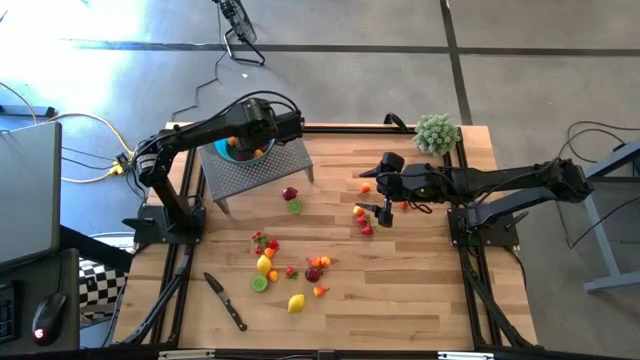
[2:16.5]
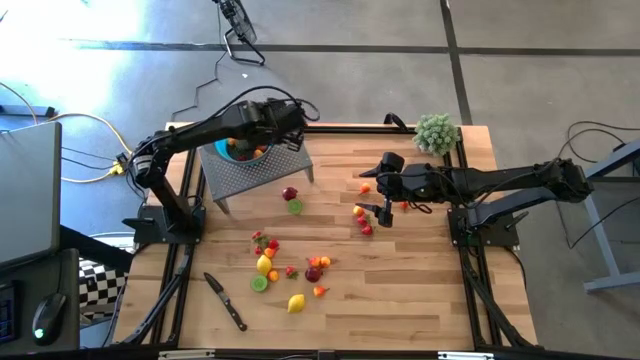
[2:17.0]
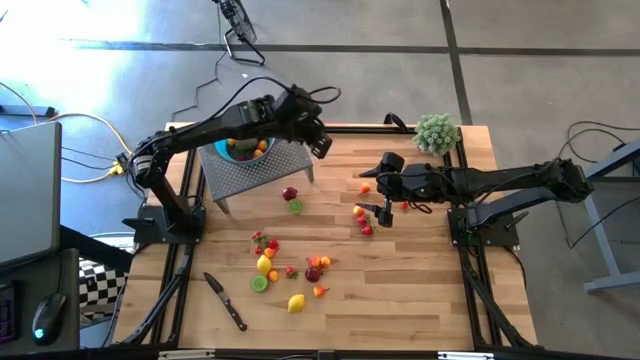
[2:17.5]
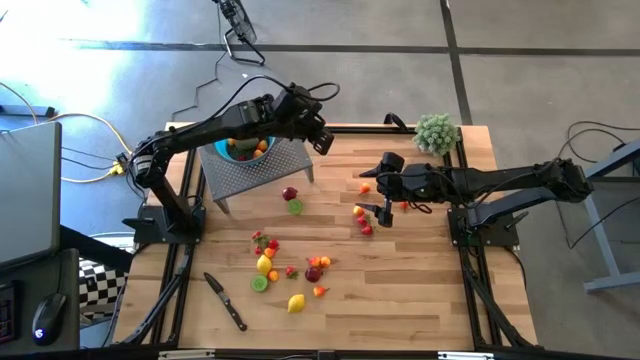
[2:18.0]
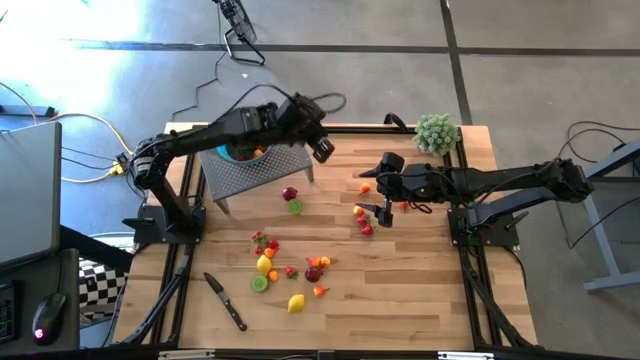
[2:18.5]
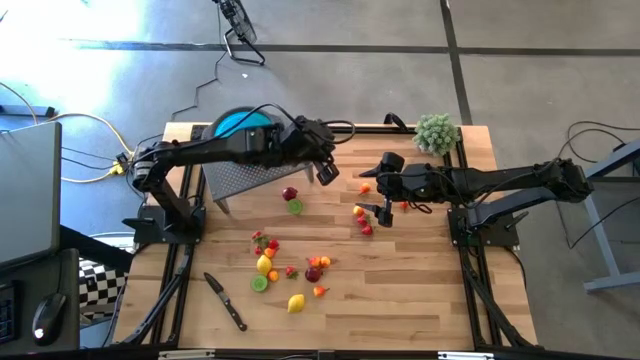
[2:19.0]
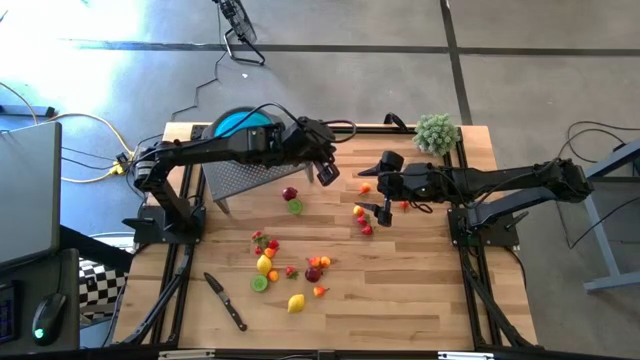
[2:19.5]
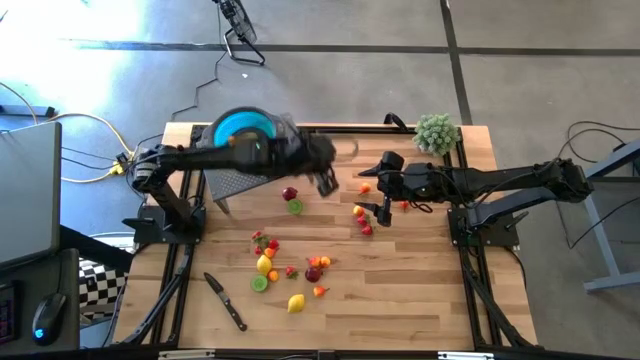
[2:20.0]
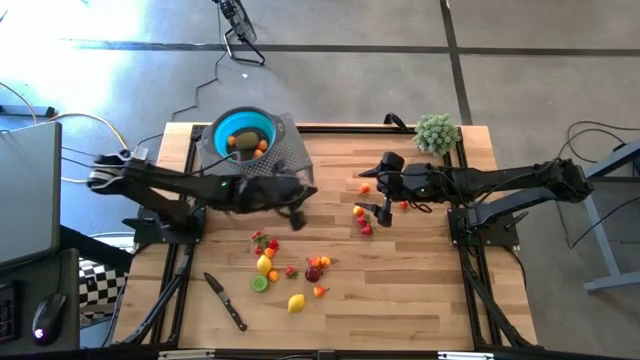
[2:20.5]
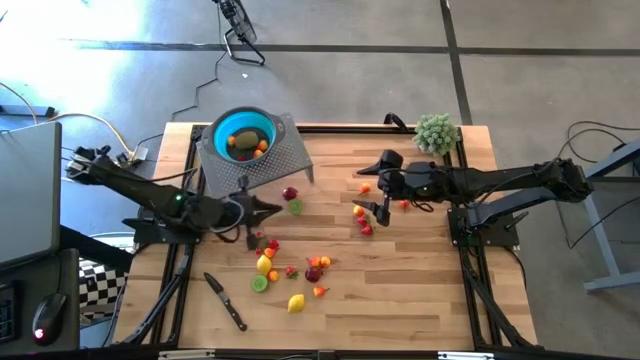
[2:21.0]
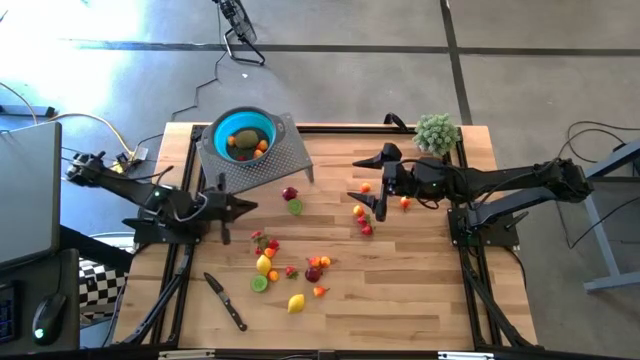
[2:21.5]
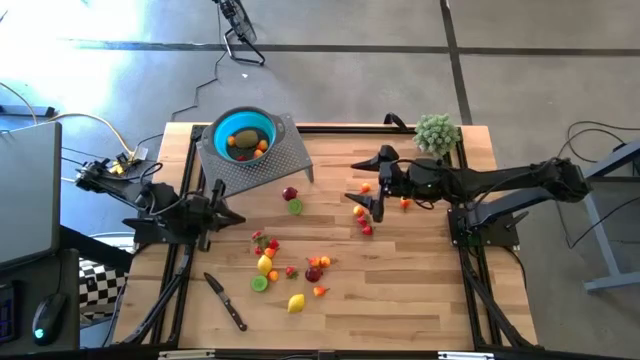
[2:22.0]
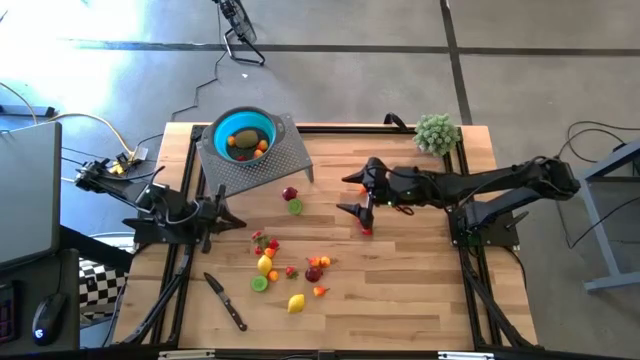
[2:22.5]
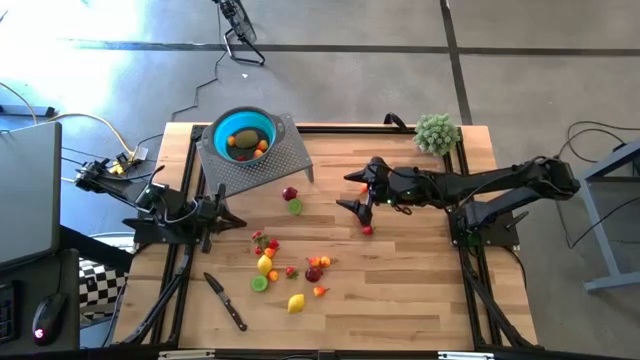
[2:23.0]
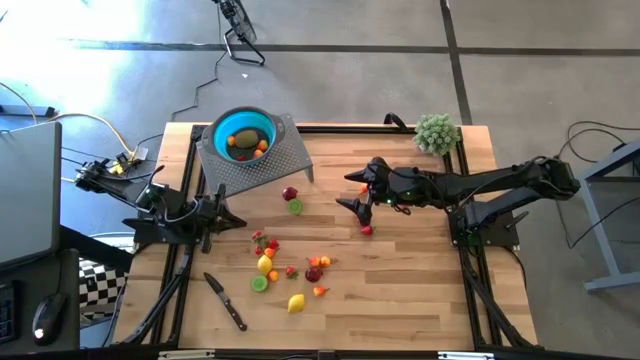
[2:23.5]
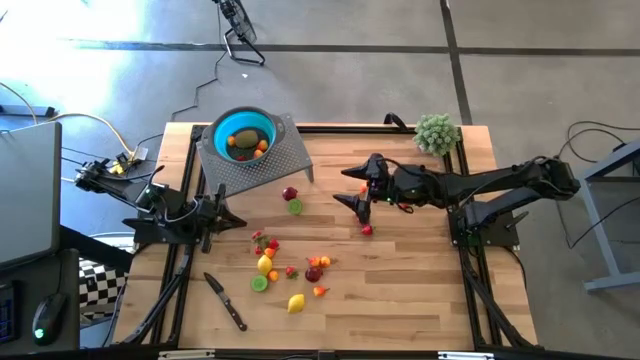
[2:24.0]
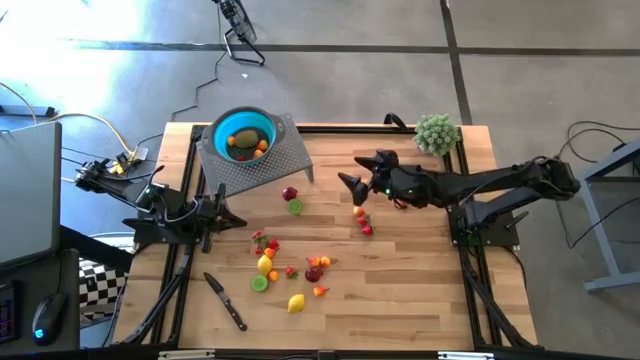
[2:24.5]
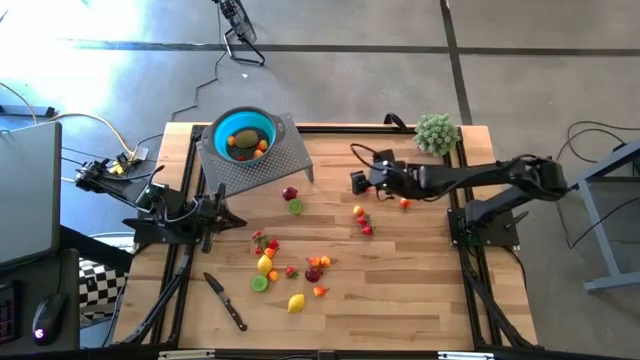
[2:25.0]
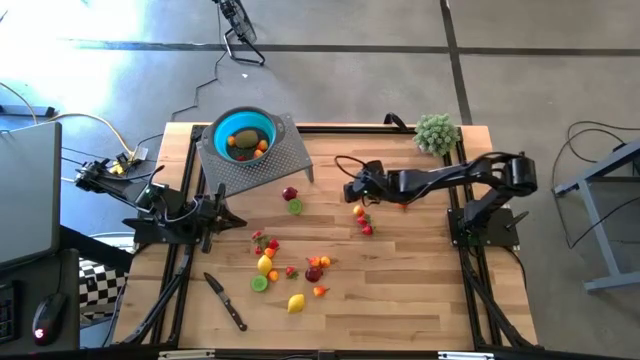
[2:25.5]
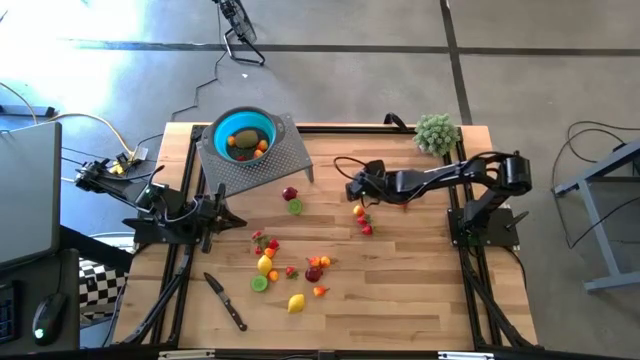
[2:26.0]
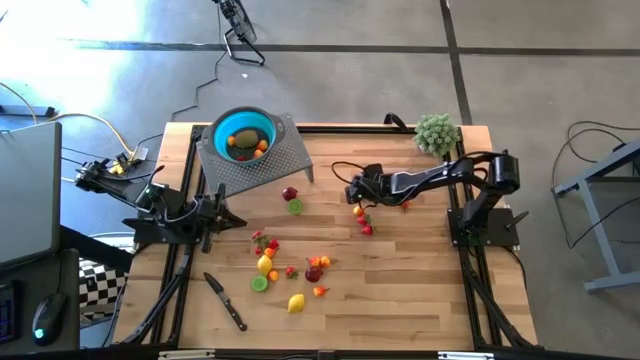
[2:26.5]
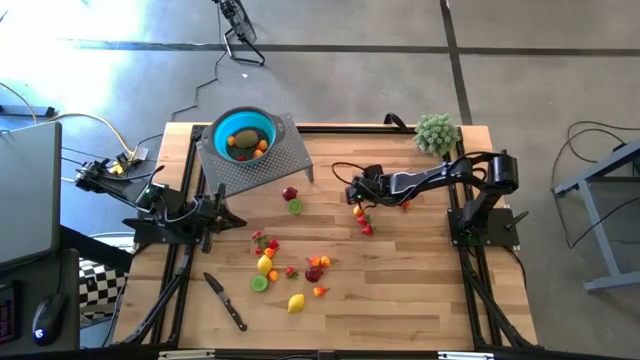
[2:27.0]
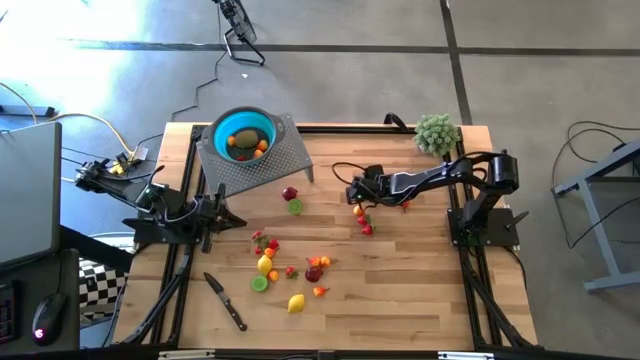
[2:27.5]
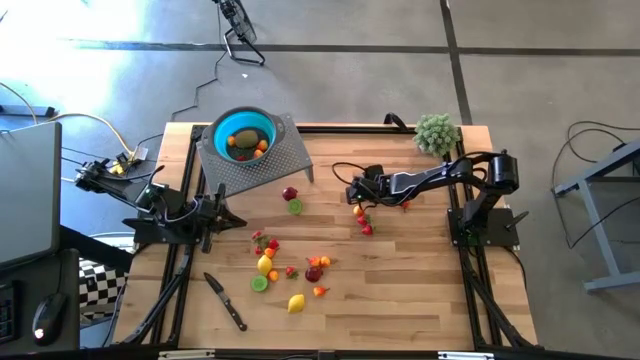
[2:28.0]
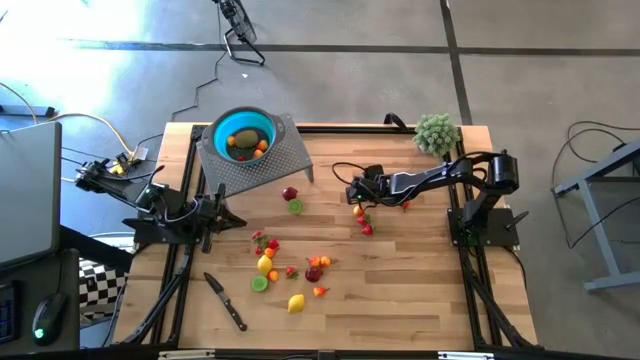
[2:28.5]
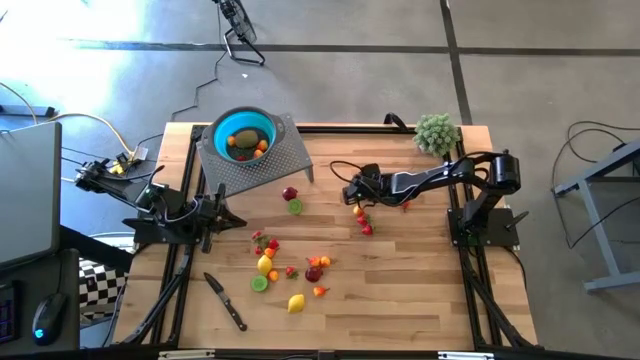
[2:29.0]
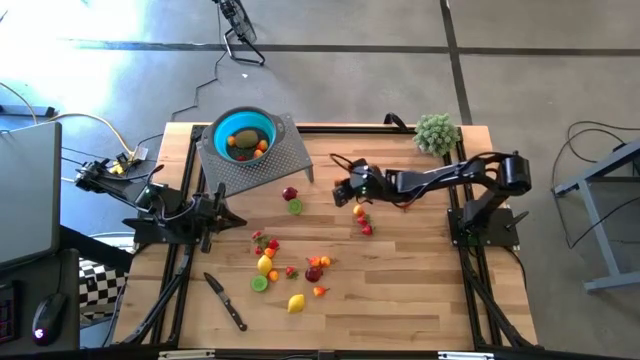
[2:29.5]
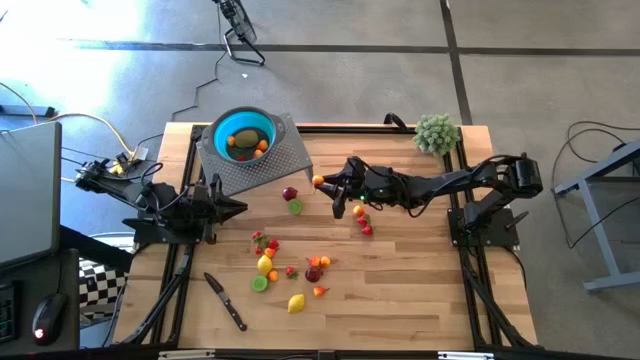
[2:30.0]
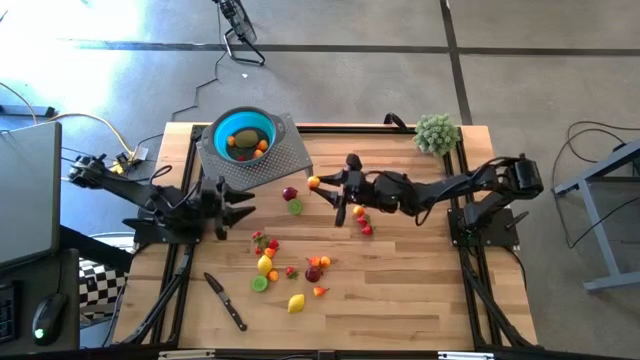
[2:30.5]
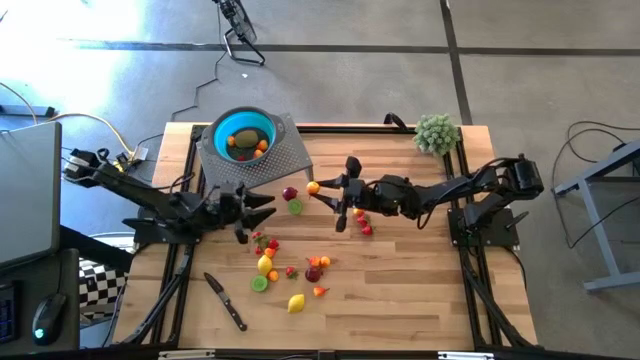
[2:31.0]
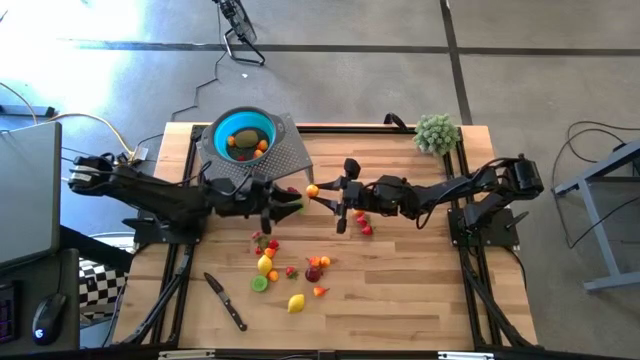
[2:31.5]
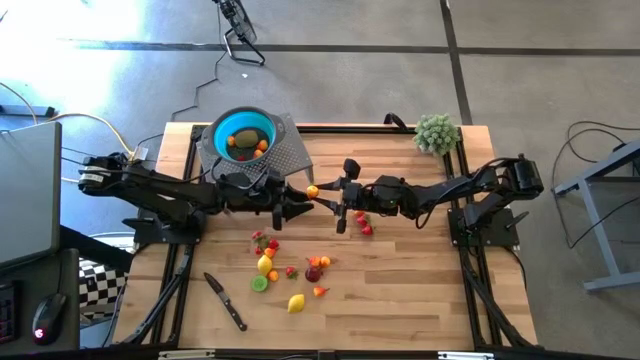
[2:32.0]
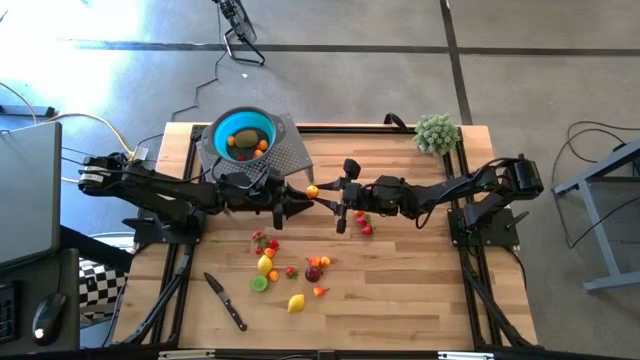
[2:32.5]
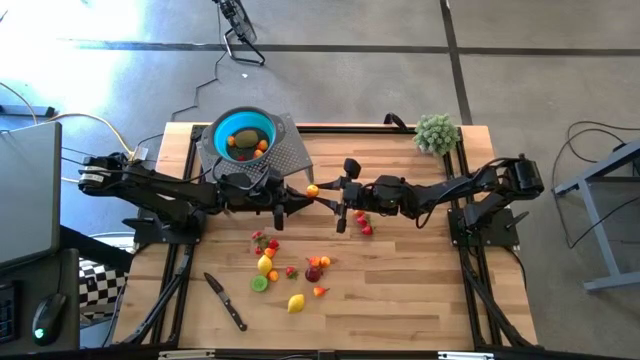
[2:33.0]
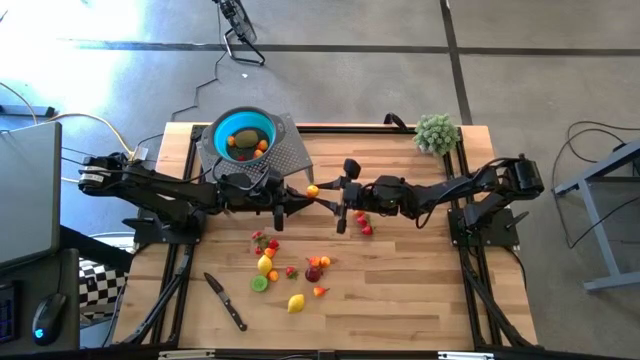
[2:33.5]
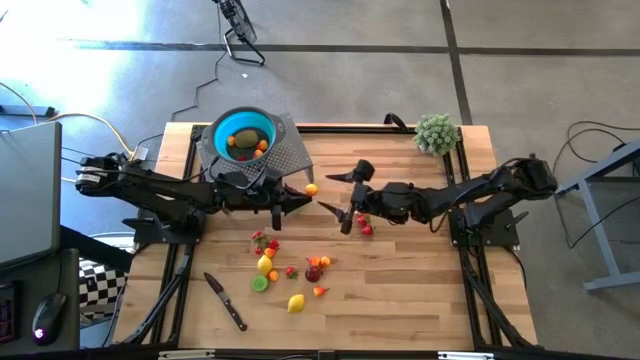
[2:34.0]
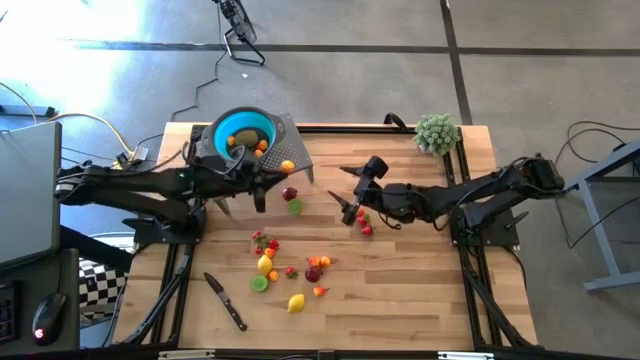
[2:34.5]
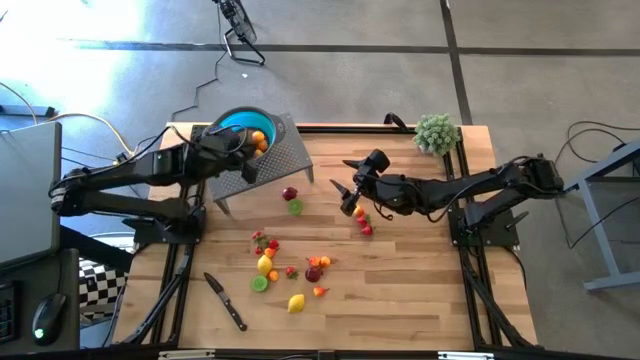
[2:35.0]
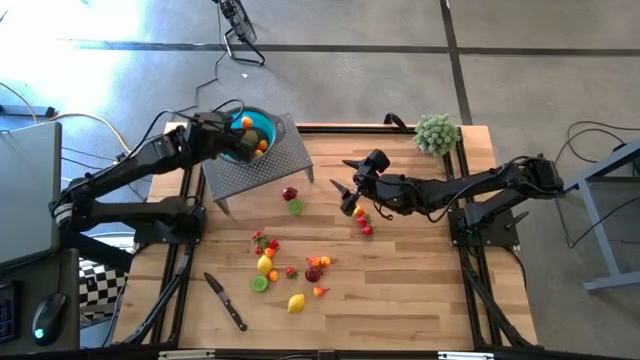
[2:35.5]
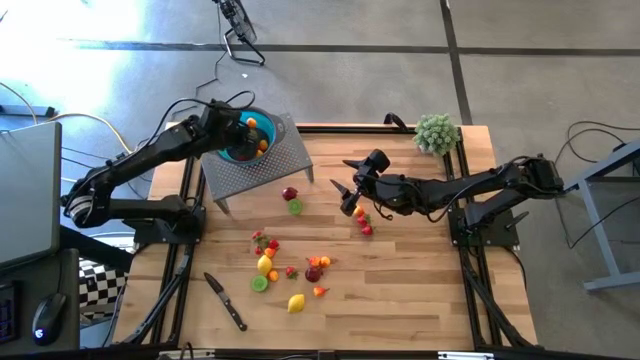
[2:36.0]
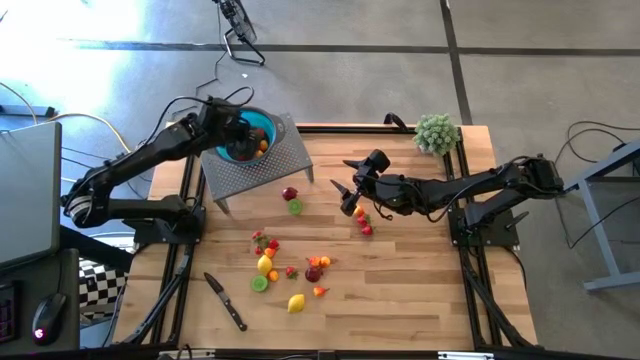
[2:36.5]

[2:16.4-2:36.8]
Task: Pick & Place Fruit
Put the orange pear into the blue strainer bowl on the shelf
